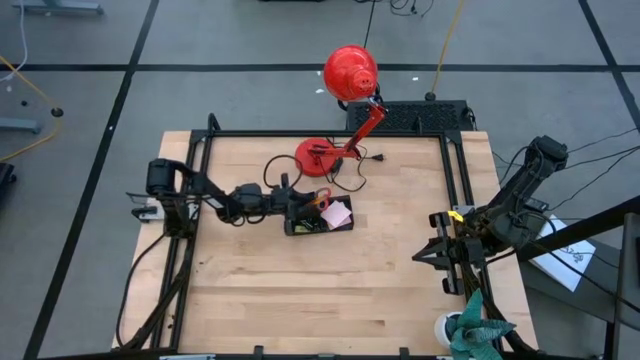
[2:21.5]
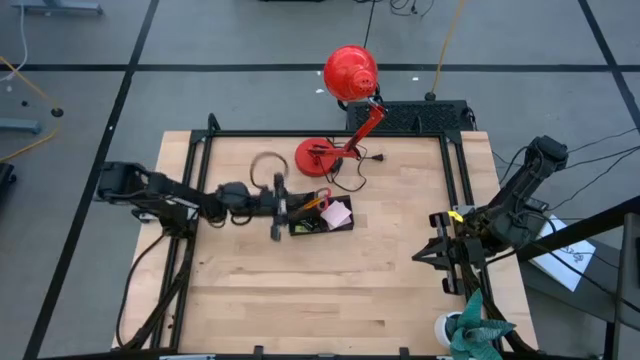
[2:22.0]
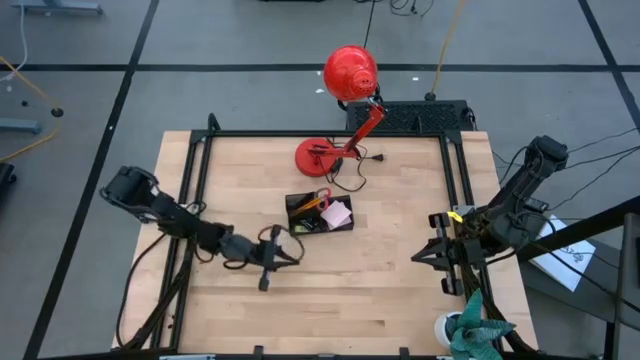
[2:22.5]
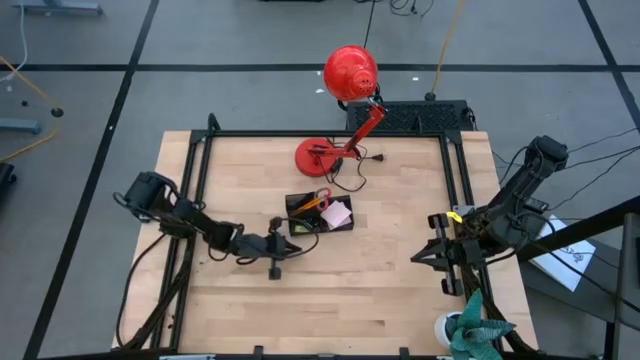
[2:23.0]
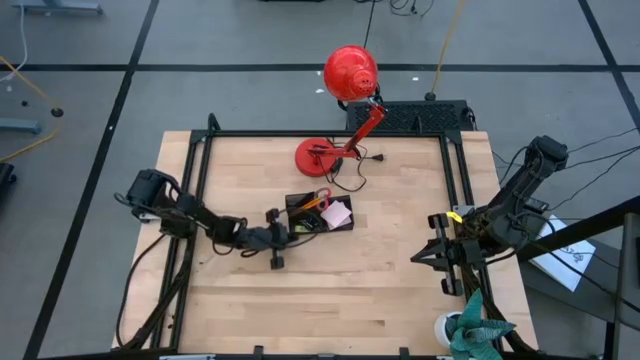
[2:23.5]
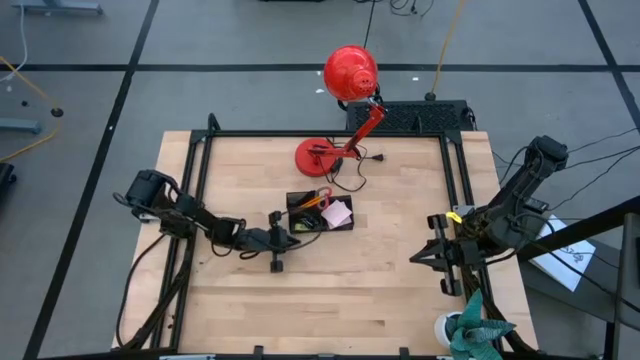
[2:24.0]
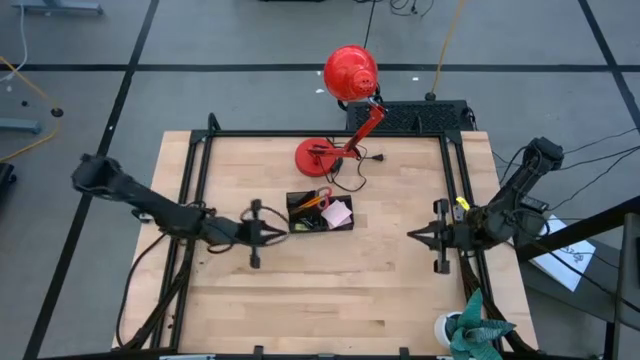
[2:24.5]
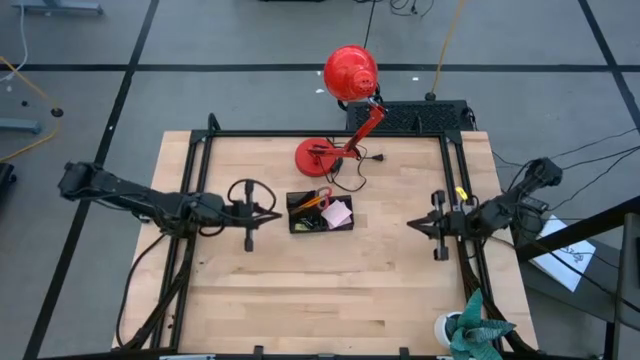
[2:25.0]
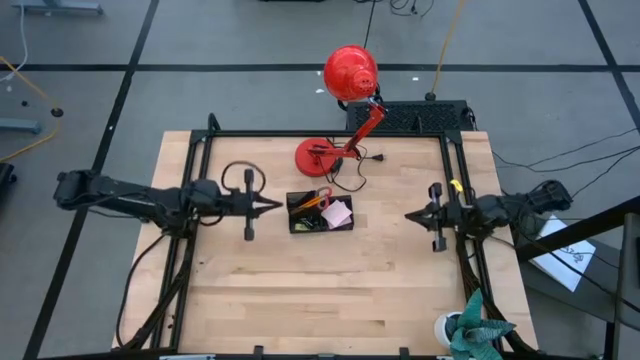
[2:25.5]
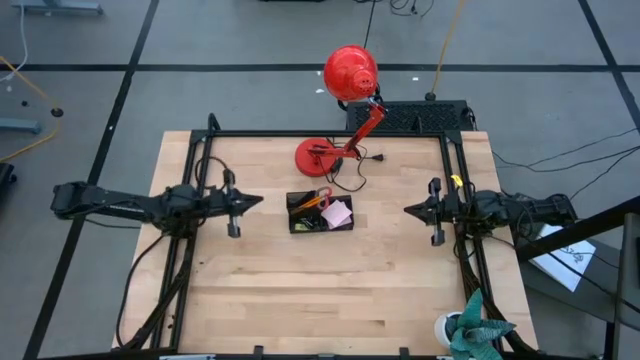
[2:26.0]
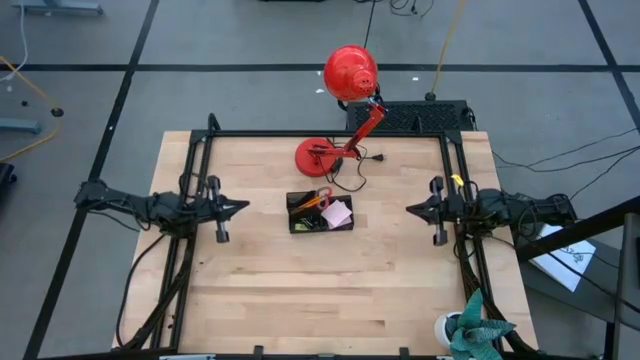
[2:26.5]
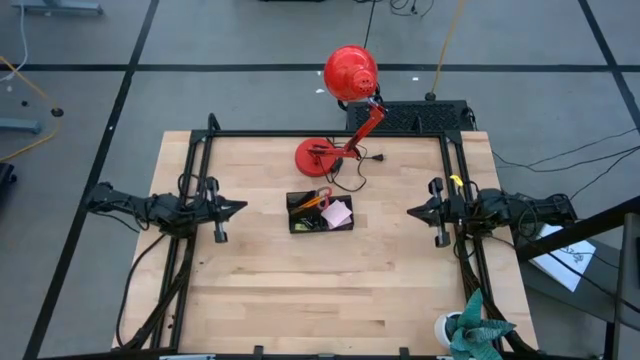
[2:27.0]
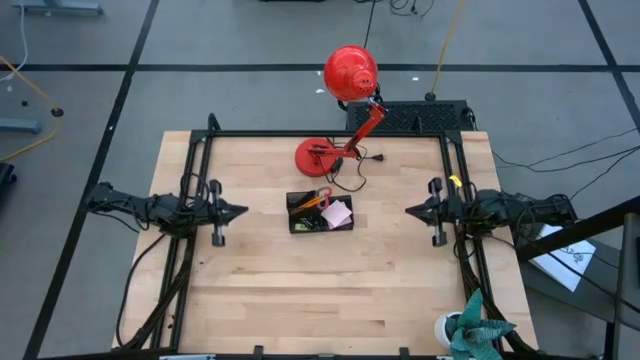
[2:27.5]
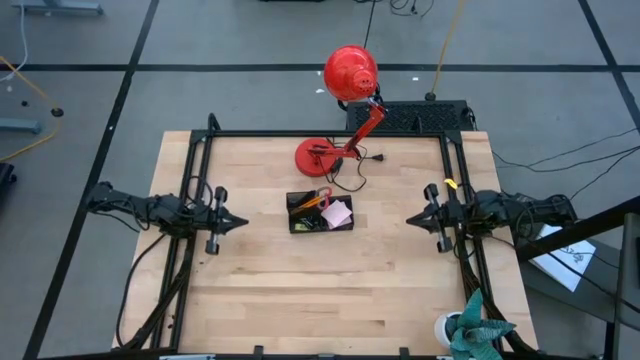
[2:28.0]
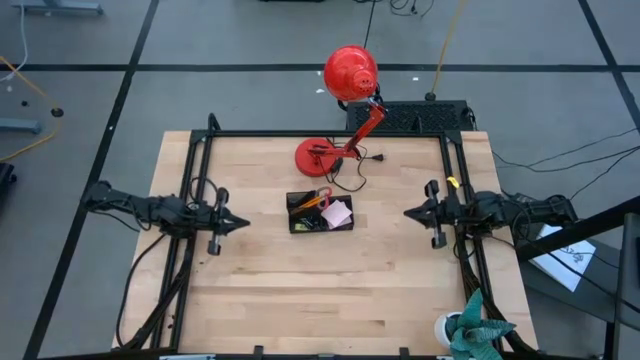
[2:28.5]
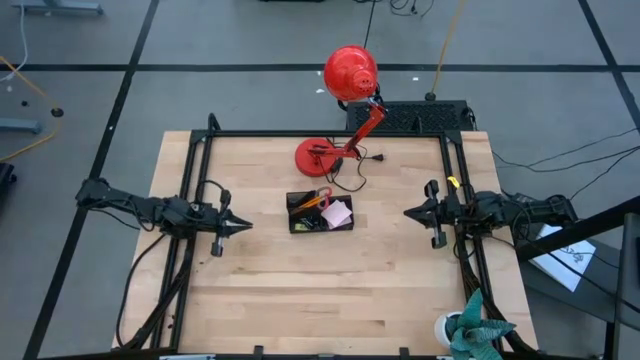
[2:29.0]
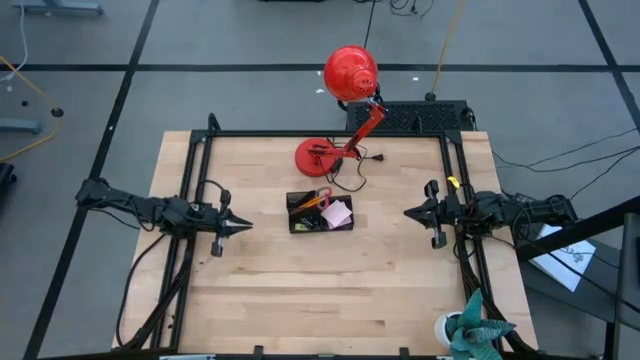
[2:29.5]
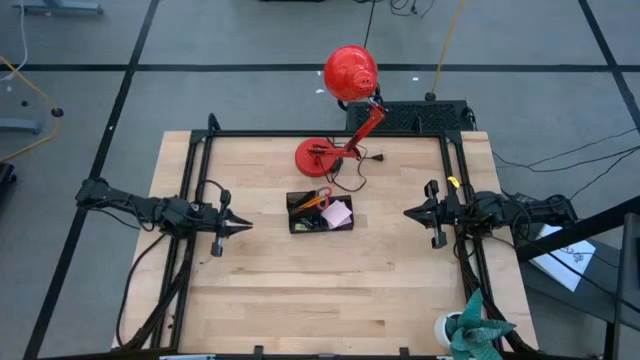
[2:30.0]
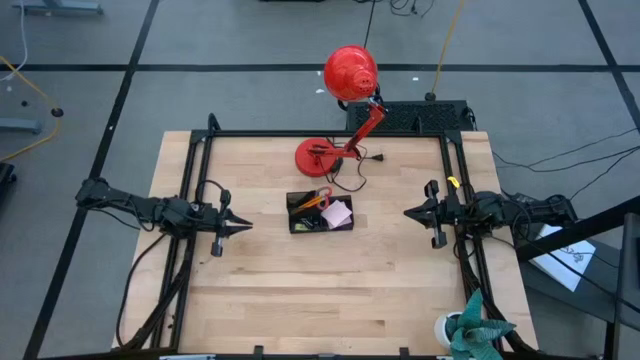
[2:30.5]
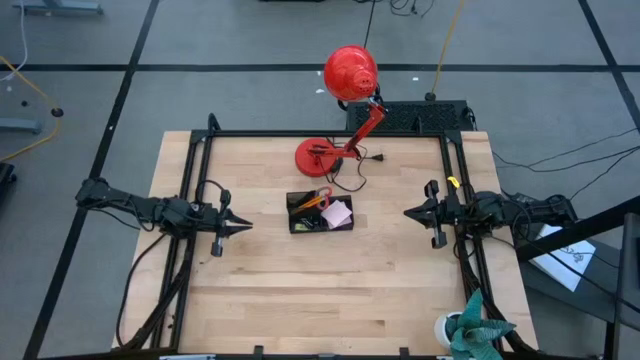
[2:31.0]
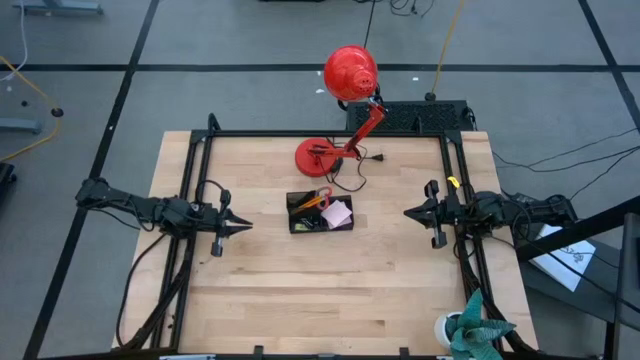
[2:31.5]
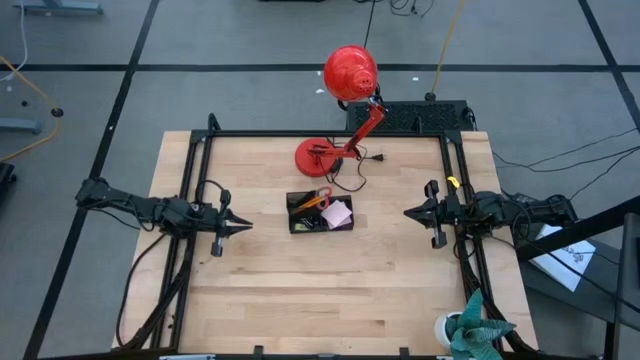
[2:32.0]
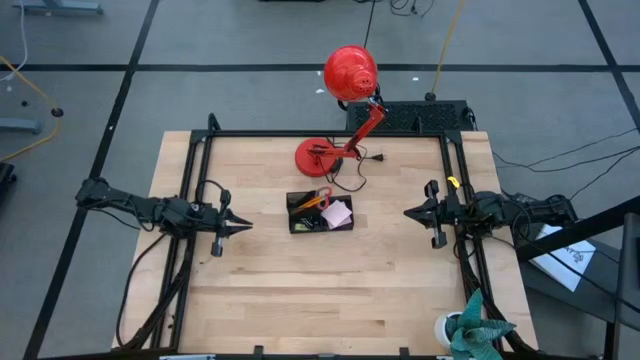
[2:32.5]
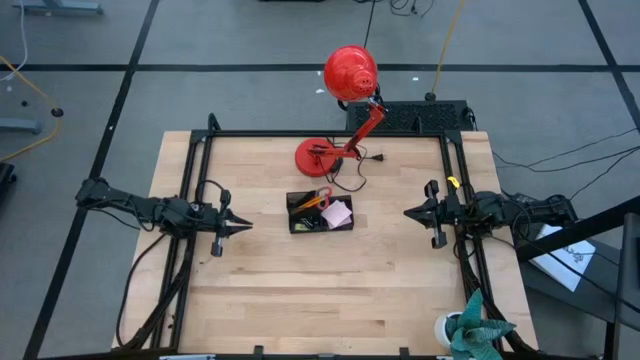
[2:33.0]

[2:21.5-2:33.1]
Task: Pick and place office supplies into organizer
Return to Home Position

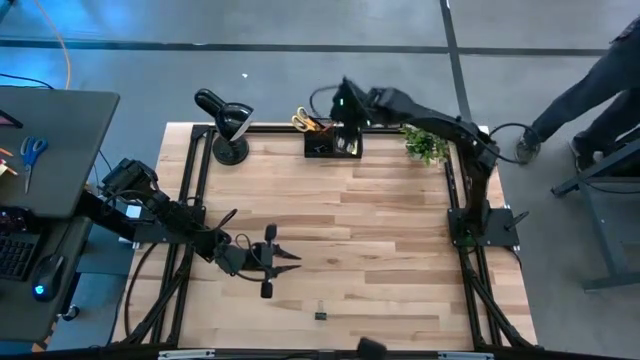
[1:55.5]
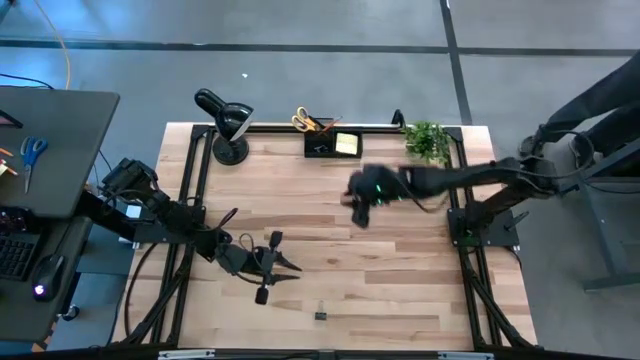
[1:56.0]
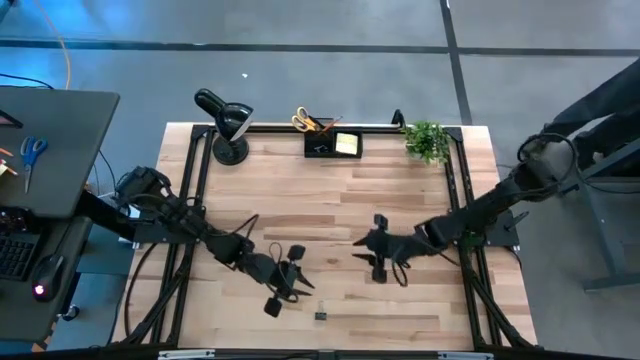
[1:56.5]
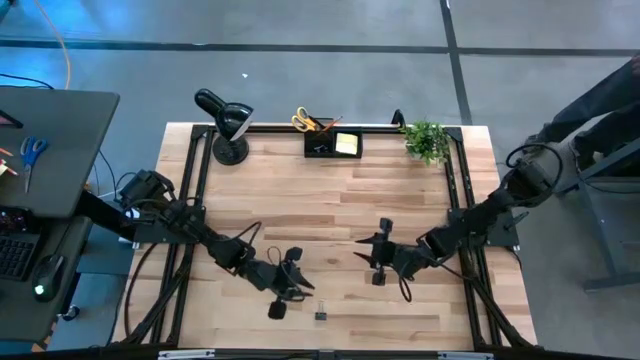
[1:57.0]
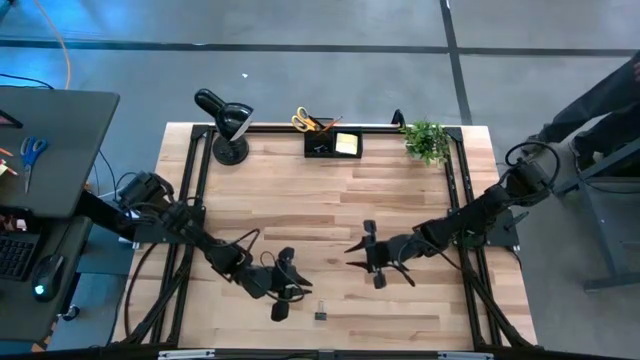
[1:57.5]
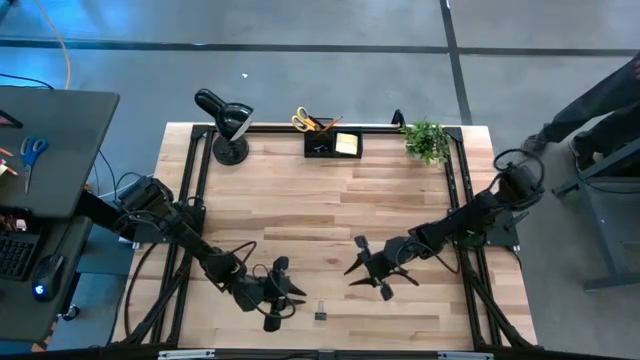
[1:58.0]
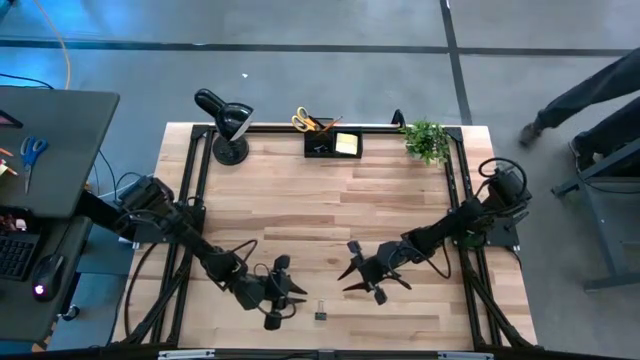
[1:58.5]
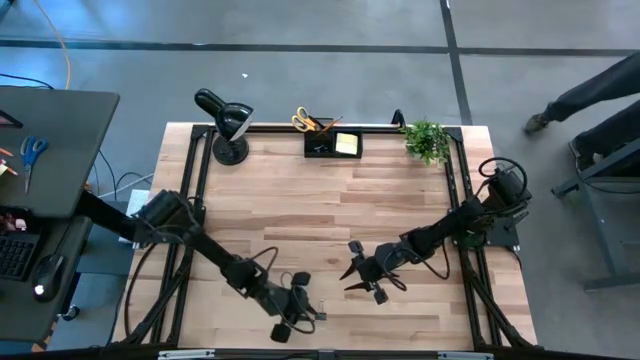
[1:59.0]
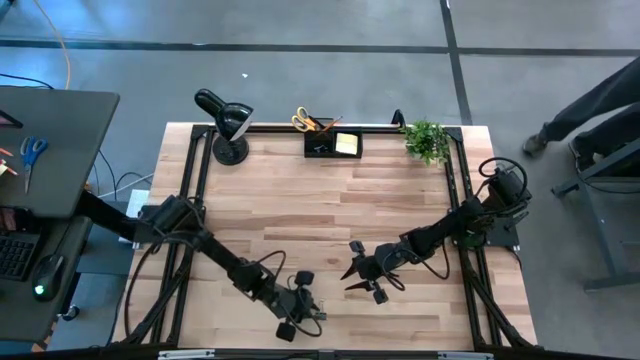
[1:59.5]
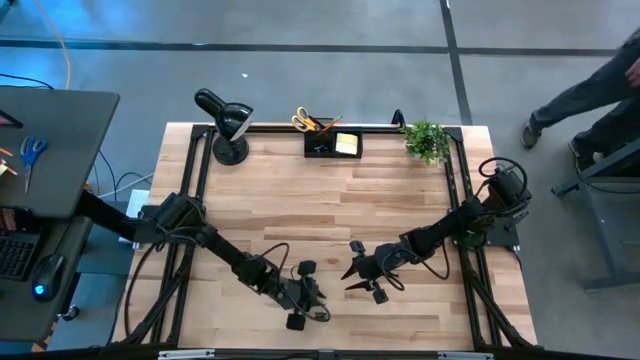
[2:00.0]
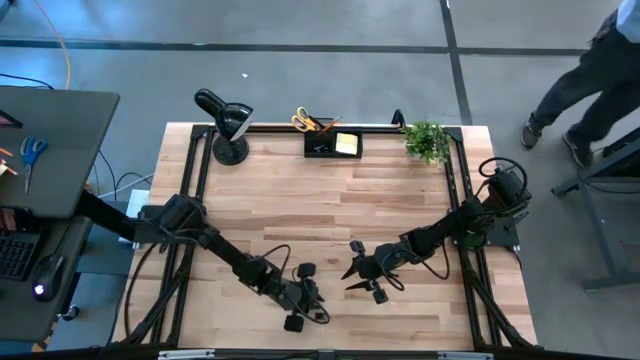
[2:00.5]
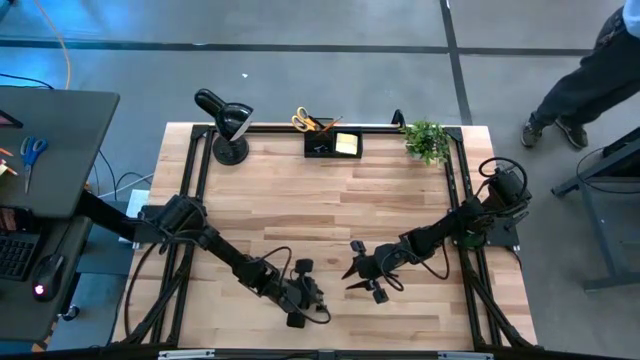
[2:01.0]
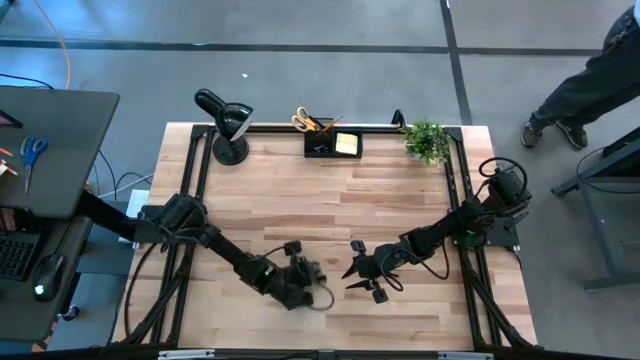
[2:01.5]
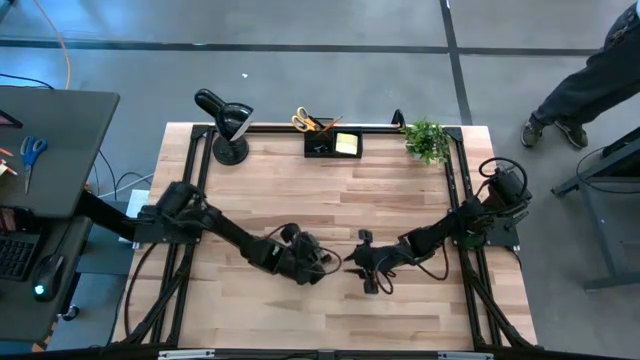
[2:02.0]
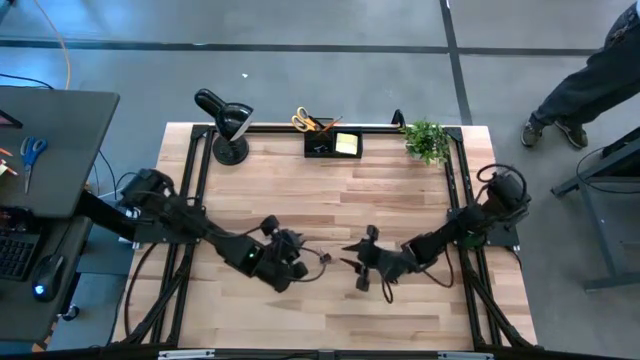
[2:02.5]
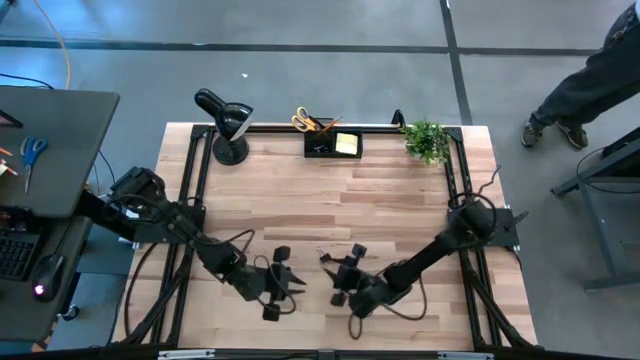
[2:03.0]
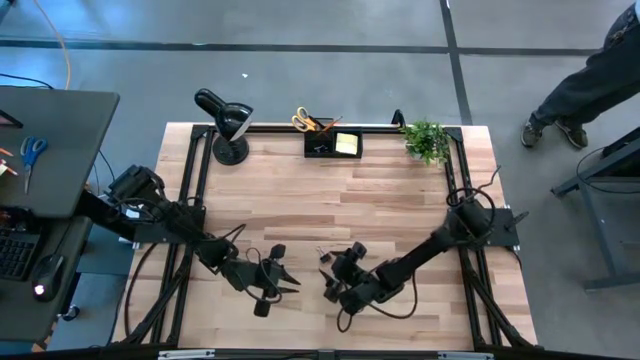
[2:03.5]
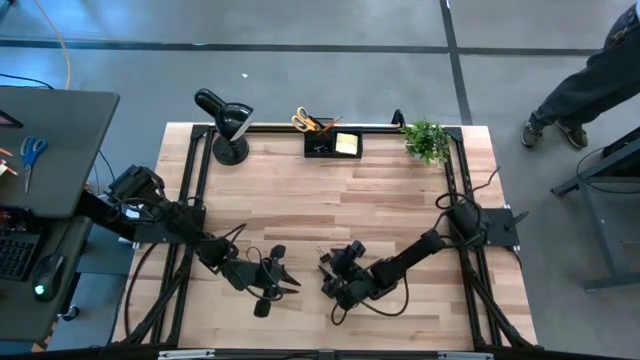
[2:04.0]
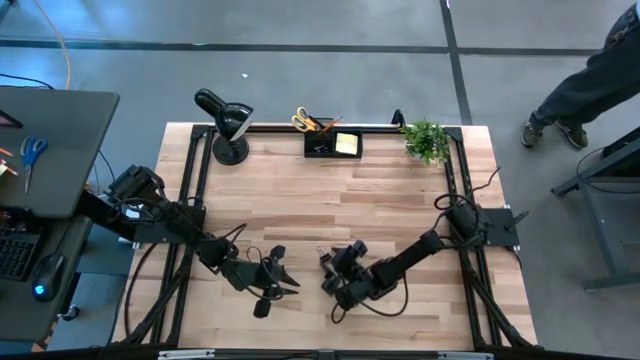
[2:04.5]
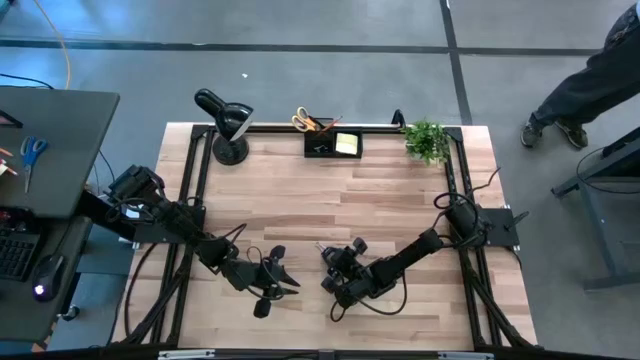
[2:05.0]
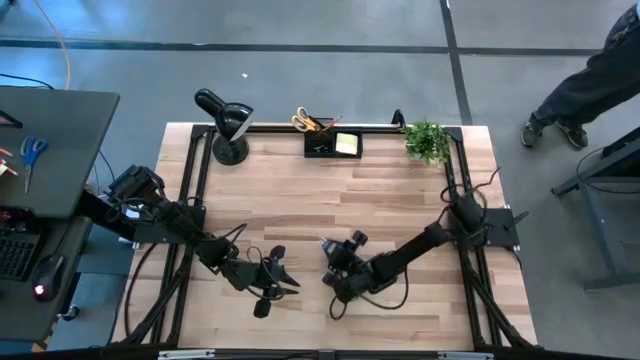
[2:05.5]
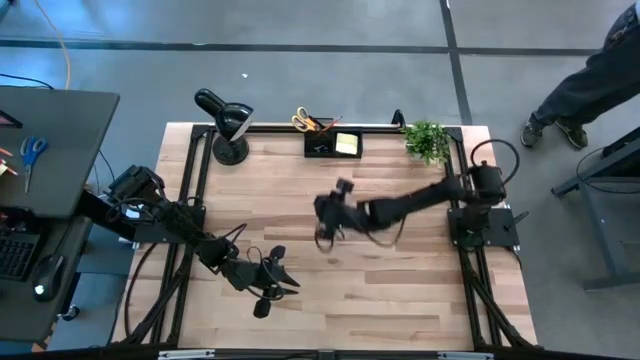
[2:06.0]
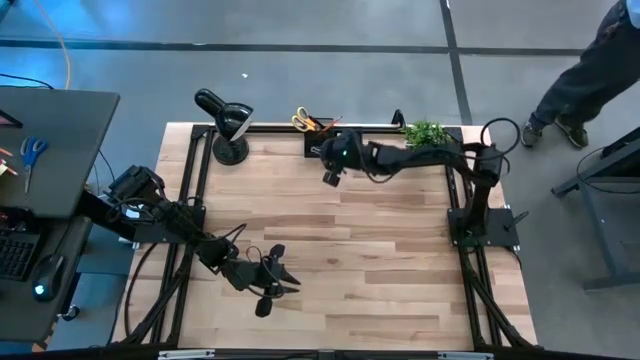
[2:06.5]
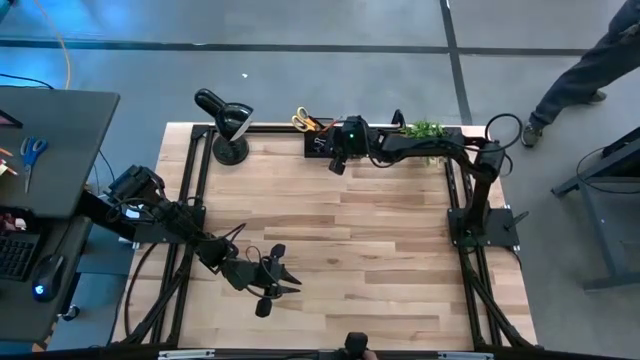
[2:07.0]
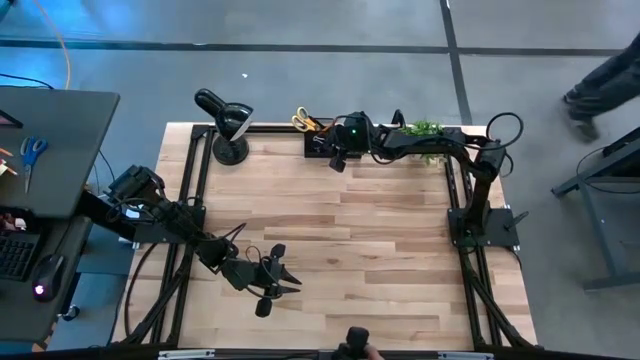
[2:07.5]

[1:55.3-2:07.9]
Task: Pick and place office supplies into organizer
Put the black binder clip into the black desk organizer
